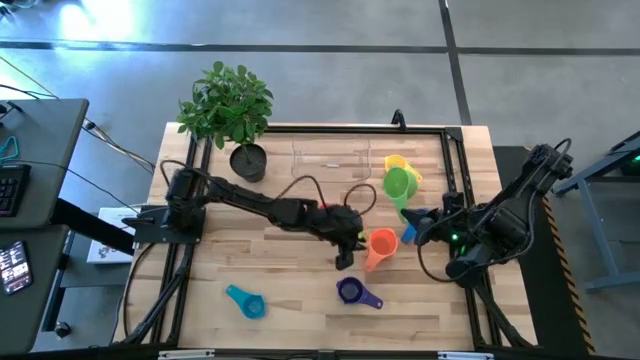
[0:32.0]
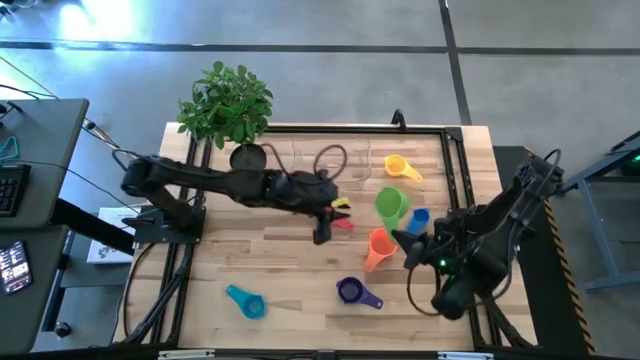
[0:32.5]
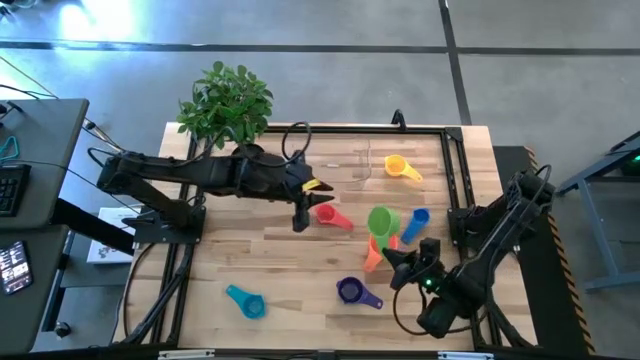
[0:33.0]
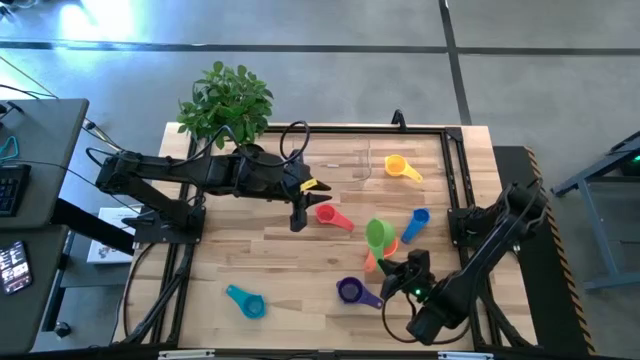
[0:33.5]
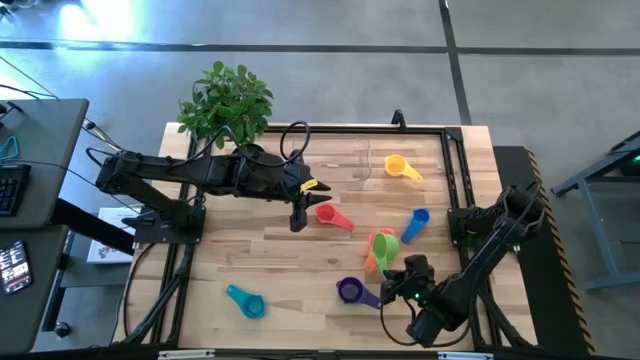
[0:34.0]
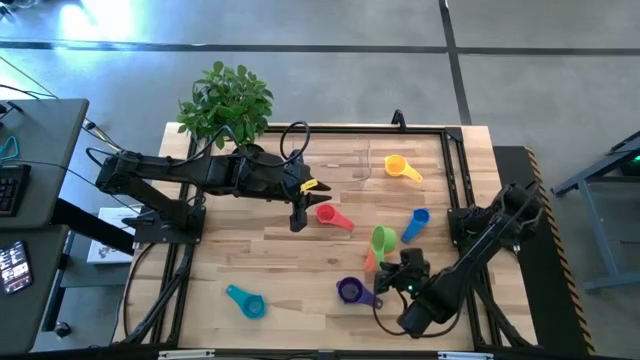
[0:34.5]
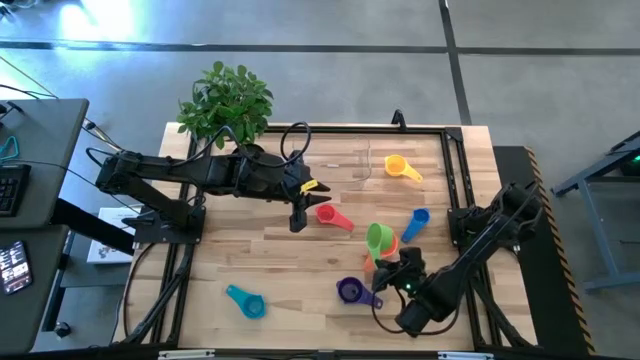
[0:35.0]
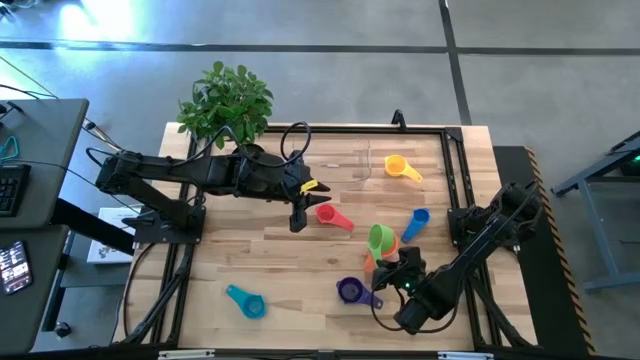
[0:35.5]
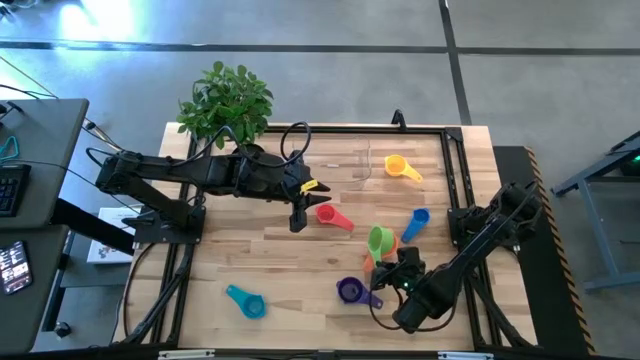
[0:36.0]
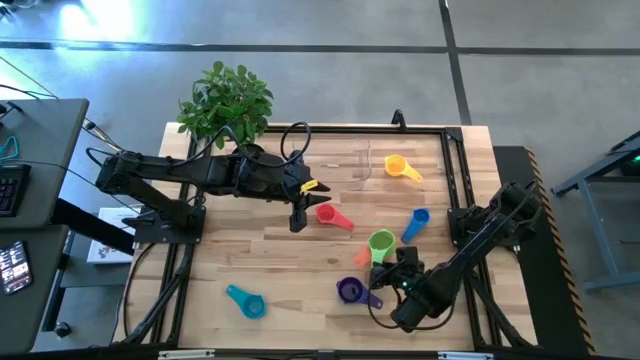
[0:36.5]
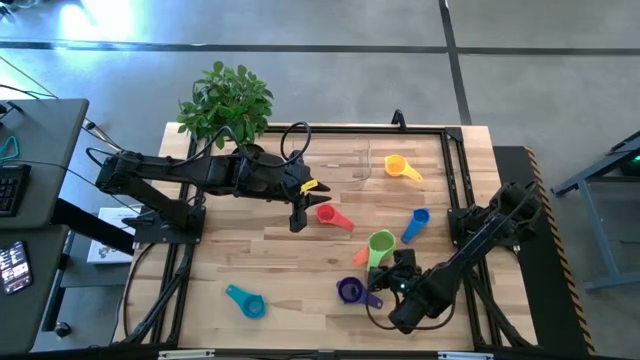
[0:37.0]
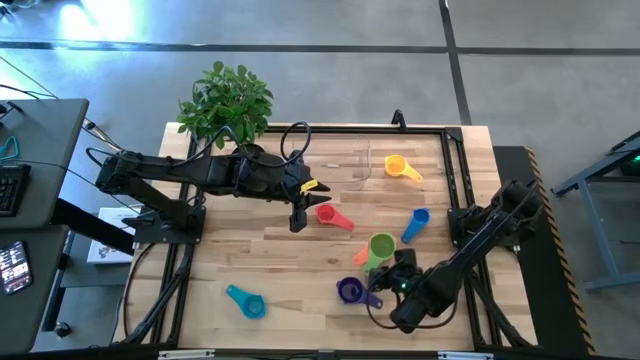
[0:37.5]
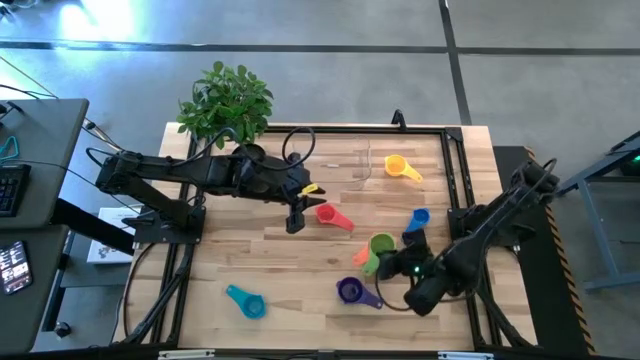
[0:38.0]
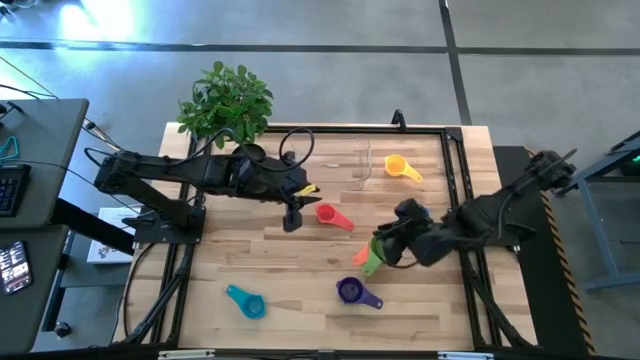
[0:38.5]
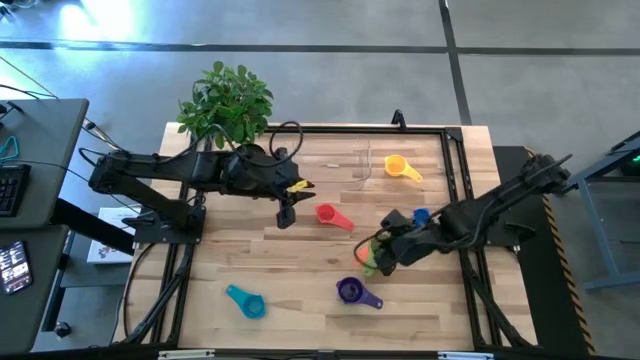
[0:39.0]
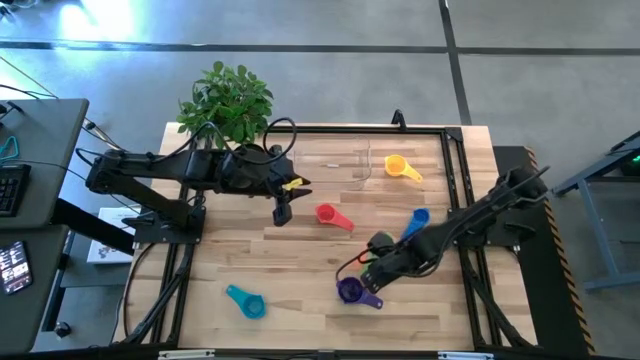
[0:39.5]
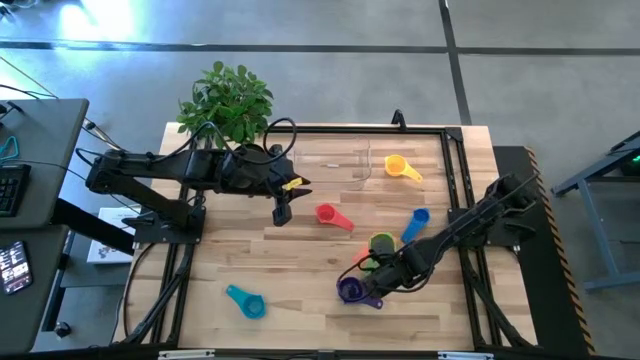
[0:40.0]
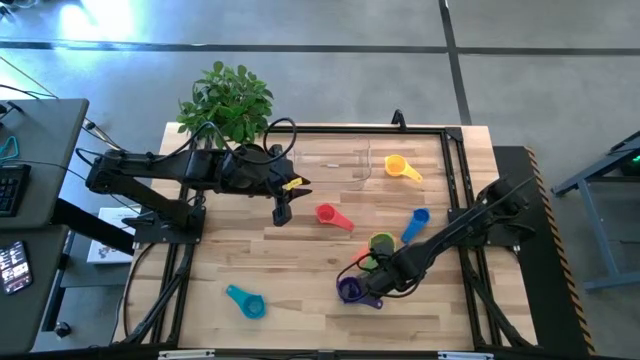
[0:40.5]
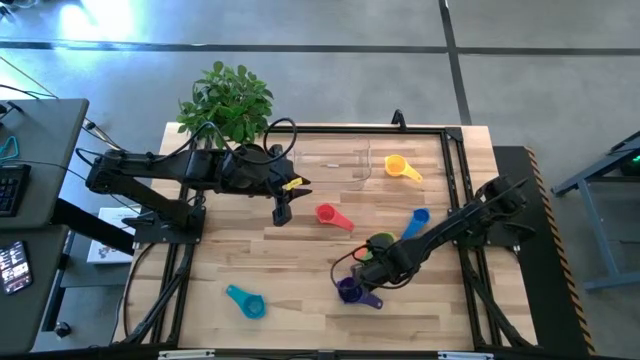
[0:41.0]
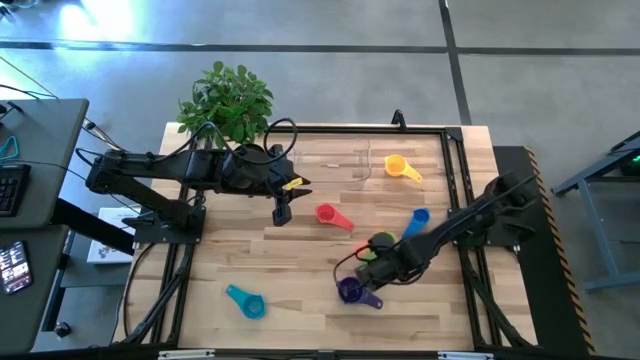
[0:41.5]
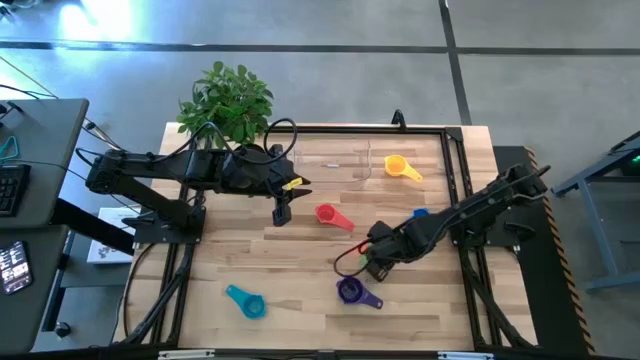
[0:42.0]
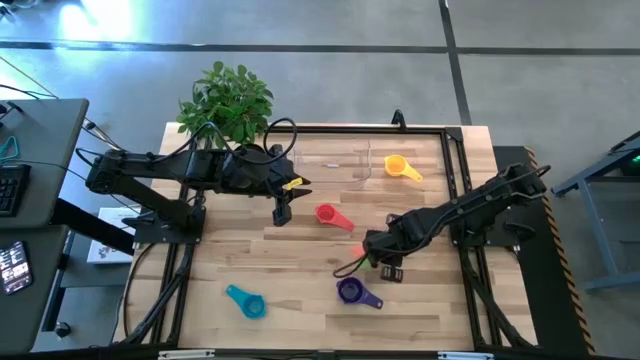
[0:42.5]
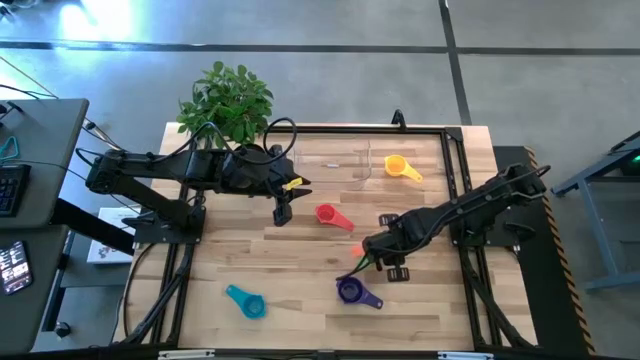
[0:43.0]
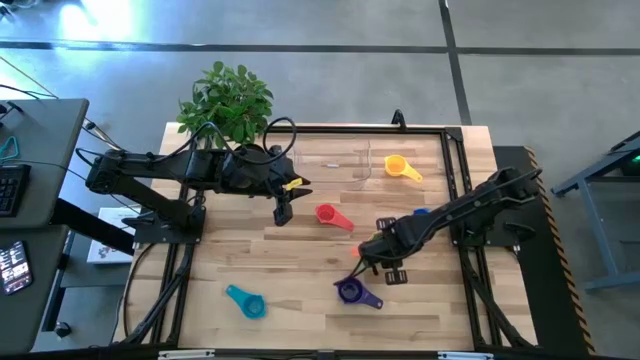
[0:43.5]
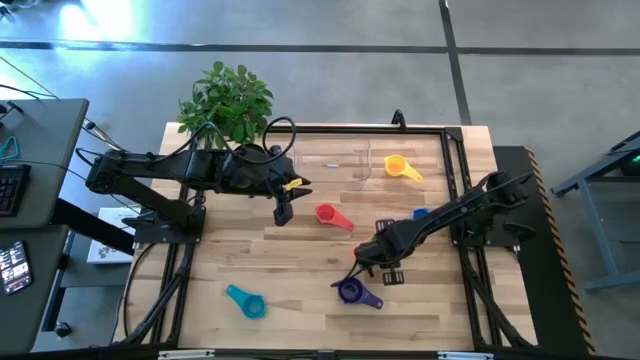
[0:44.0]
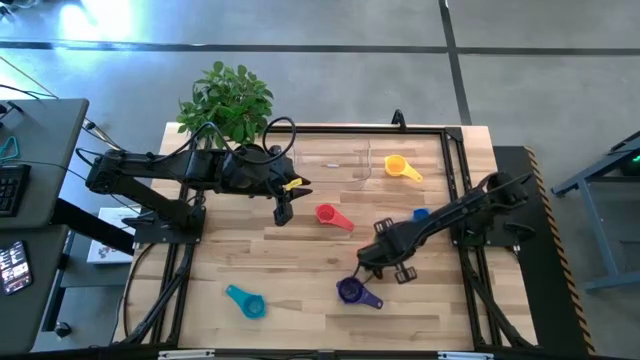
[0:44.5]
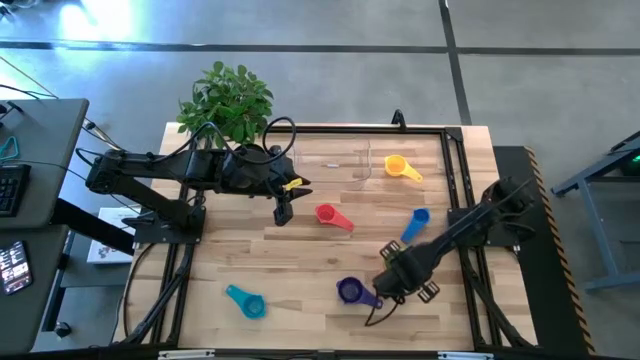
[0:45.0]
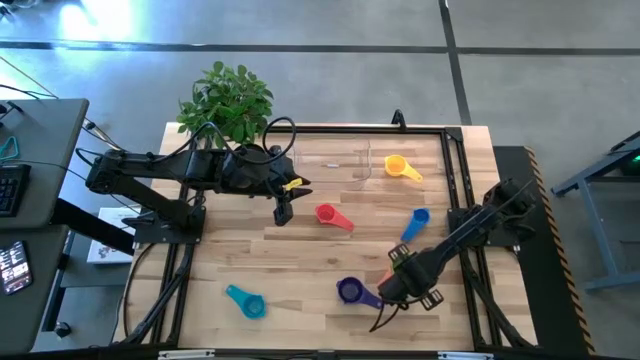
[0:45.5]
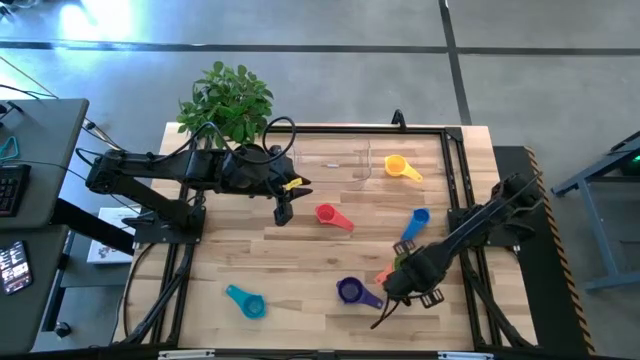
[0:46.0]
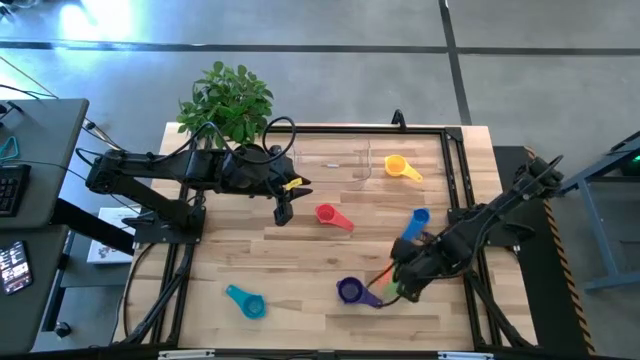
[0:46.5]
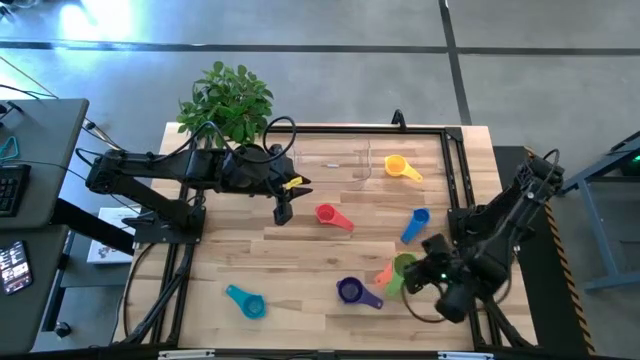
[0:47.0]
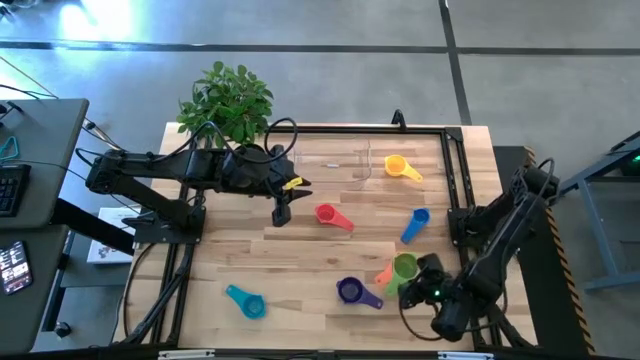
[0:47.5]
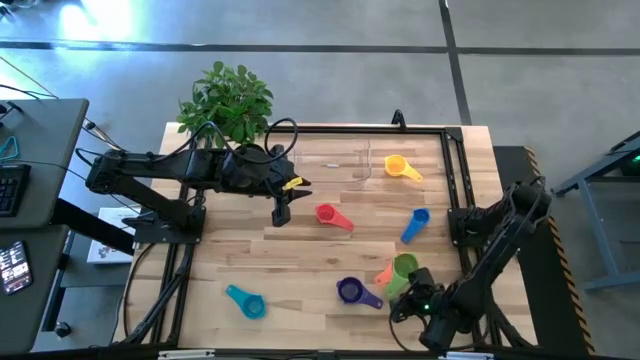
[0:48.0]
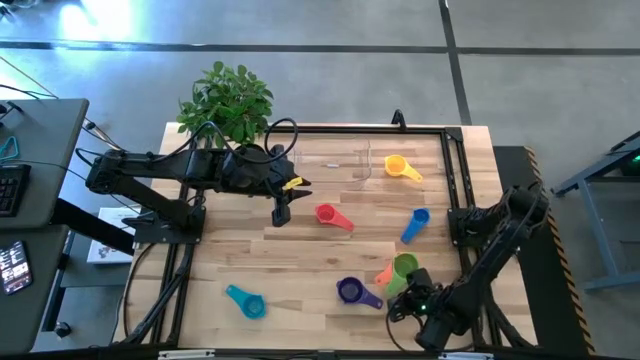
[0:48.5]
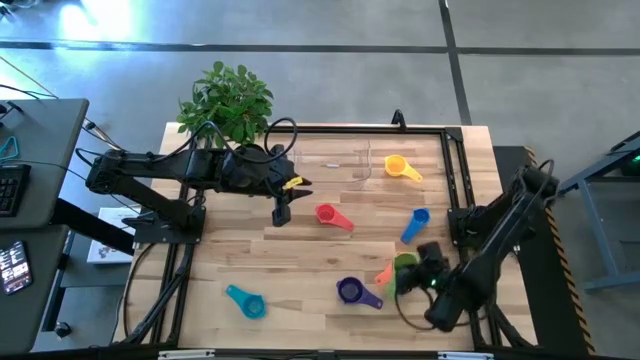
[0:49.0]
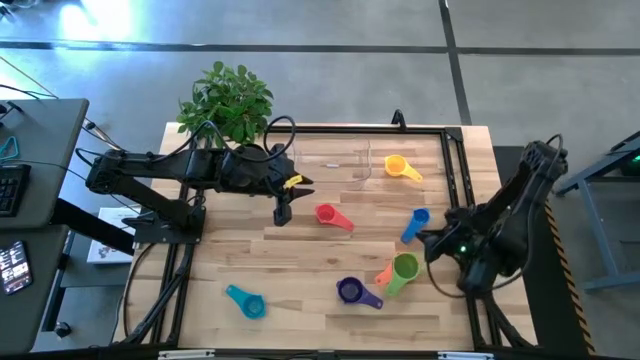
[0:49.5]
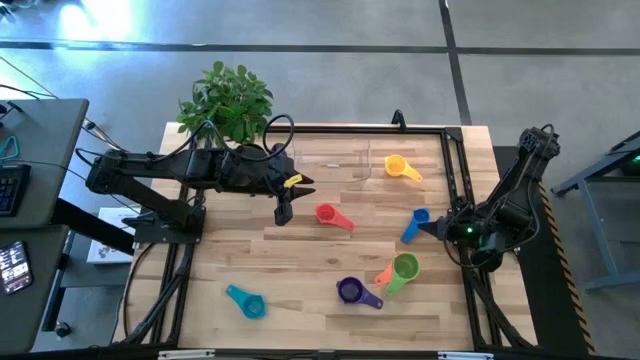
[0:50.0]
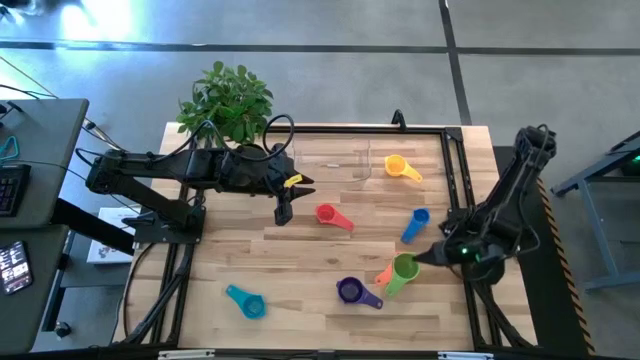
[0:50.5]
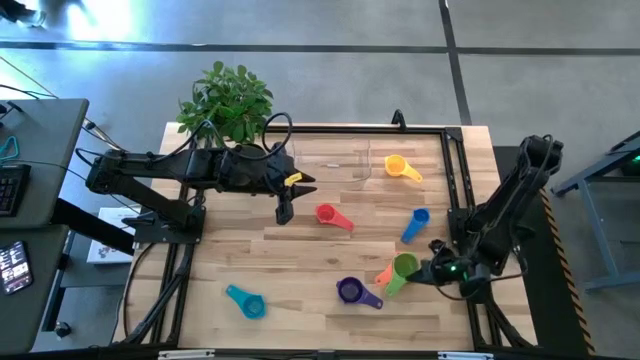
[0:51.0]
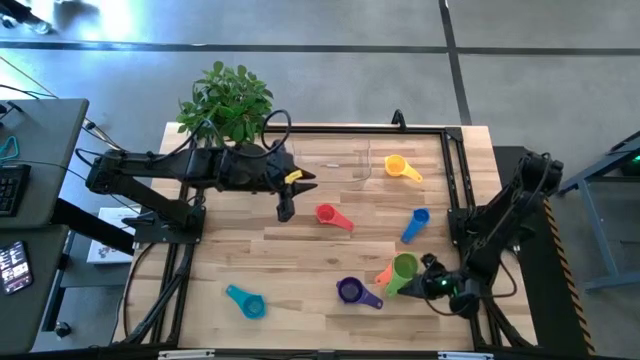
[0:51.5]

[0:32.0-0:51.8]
Task: Nest measuring cups in basket
Stack the green measuring cup on top of the orange measuring cup
